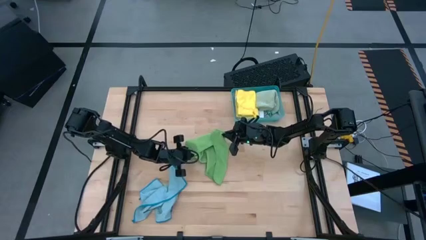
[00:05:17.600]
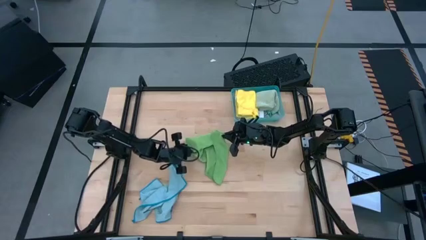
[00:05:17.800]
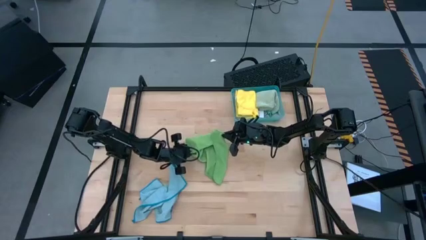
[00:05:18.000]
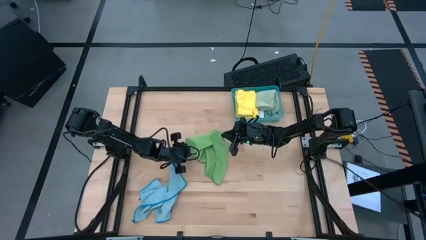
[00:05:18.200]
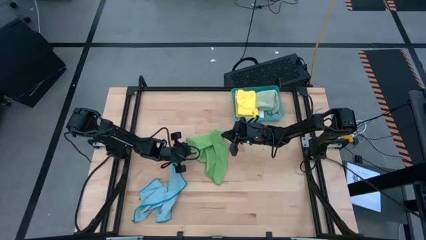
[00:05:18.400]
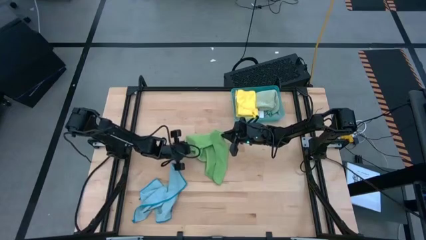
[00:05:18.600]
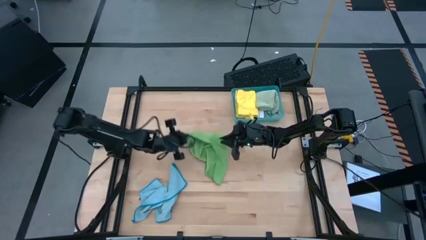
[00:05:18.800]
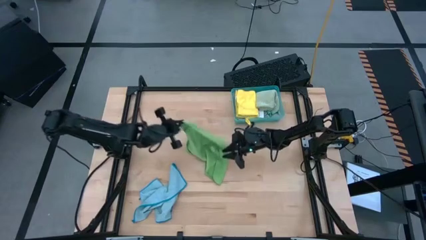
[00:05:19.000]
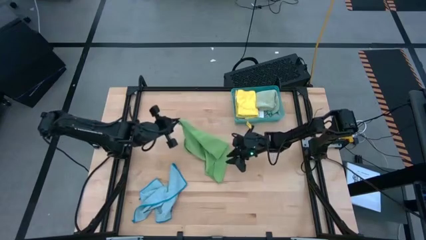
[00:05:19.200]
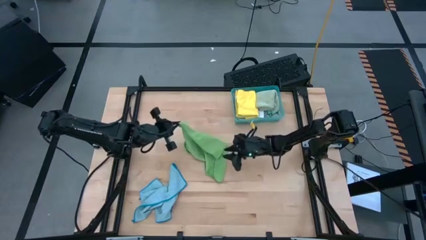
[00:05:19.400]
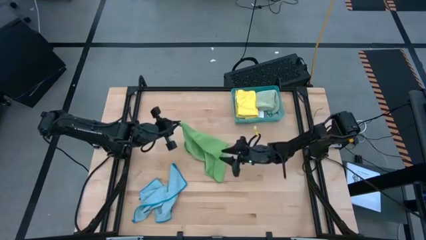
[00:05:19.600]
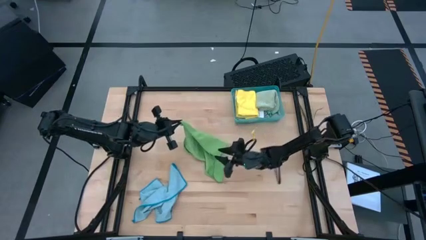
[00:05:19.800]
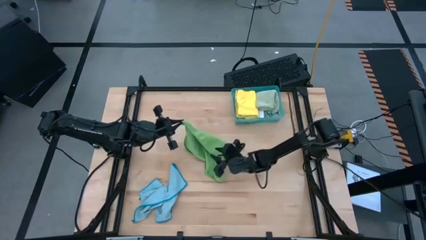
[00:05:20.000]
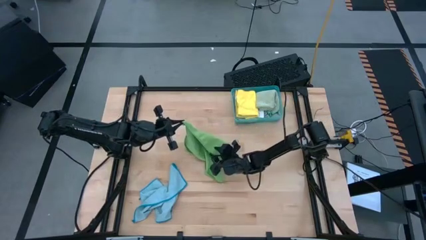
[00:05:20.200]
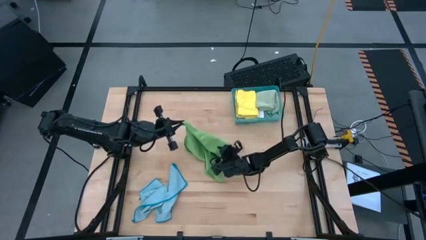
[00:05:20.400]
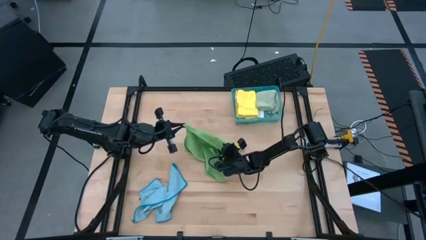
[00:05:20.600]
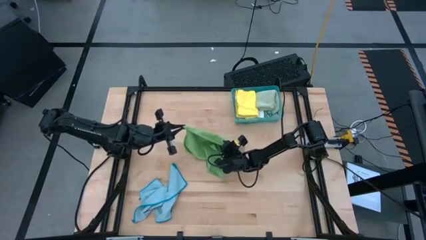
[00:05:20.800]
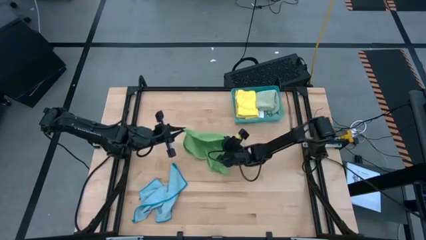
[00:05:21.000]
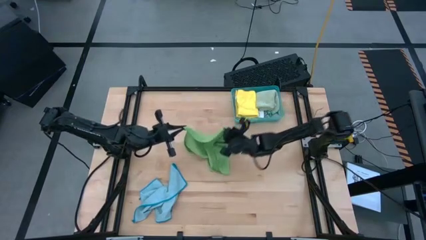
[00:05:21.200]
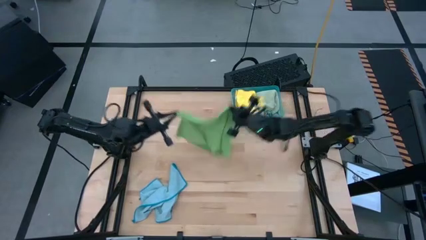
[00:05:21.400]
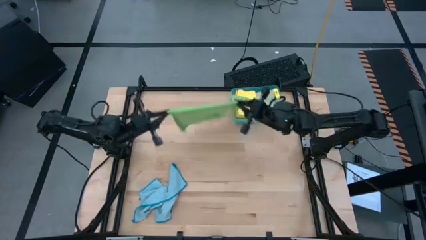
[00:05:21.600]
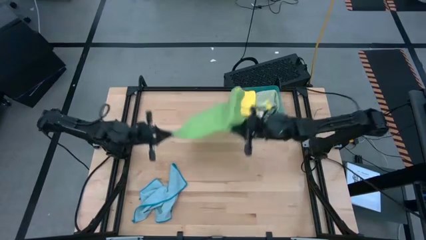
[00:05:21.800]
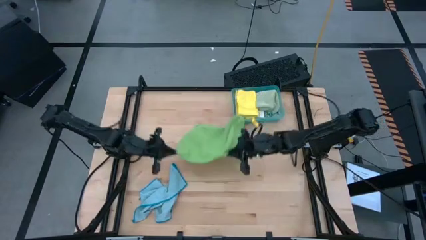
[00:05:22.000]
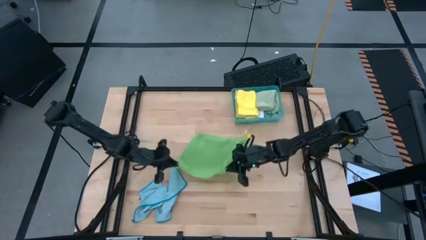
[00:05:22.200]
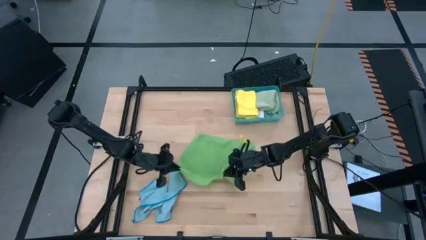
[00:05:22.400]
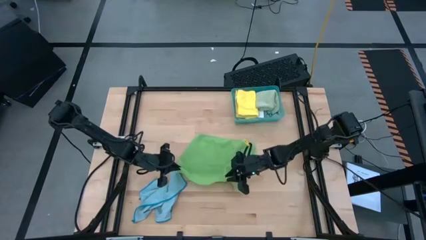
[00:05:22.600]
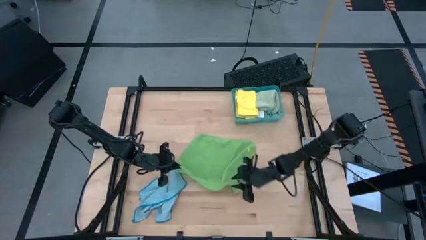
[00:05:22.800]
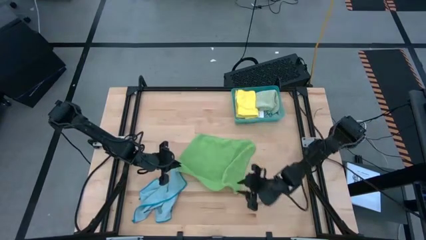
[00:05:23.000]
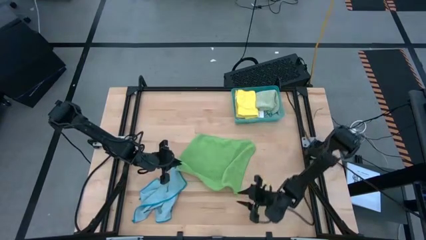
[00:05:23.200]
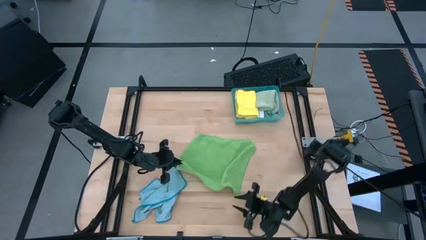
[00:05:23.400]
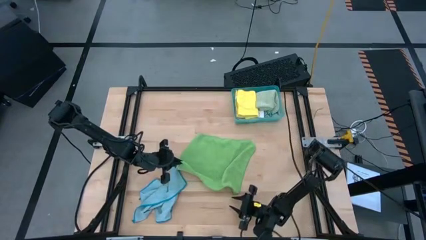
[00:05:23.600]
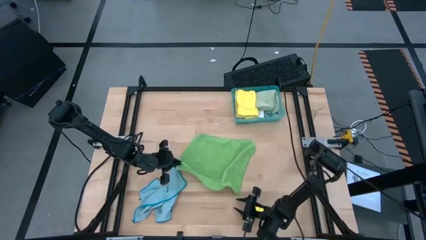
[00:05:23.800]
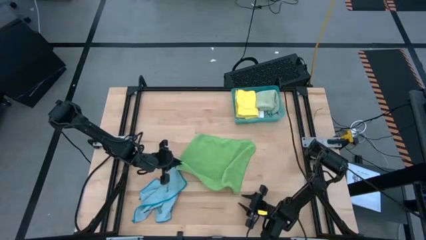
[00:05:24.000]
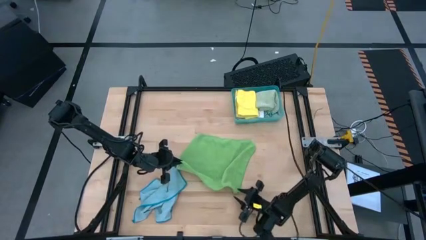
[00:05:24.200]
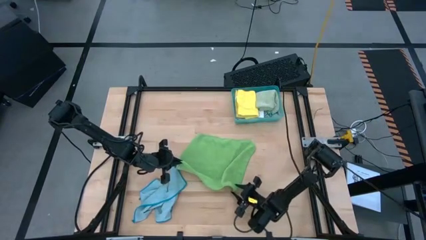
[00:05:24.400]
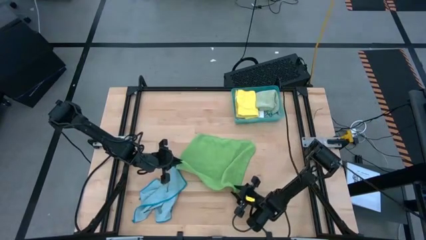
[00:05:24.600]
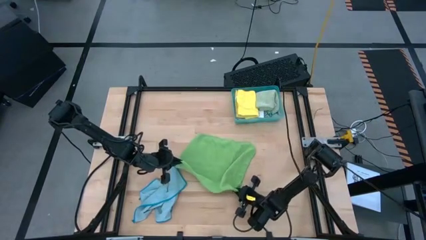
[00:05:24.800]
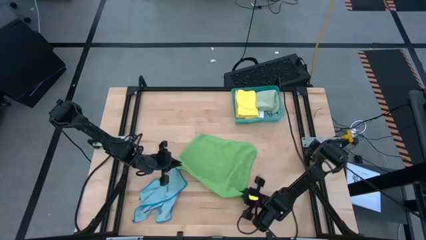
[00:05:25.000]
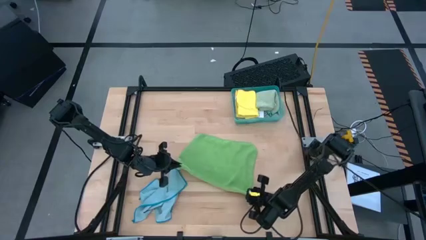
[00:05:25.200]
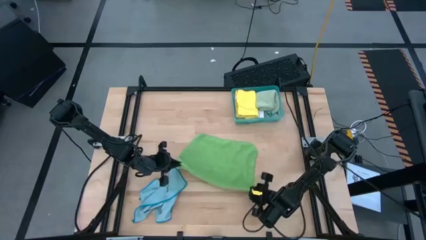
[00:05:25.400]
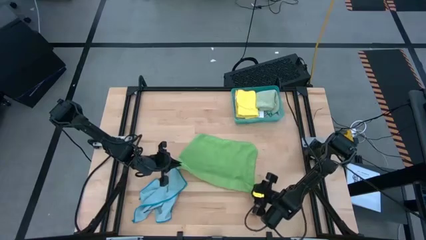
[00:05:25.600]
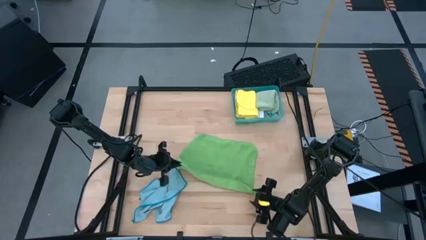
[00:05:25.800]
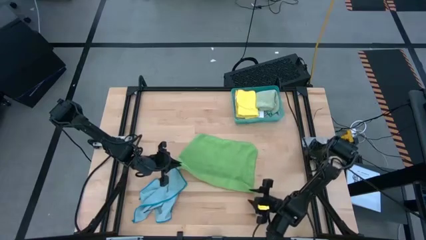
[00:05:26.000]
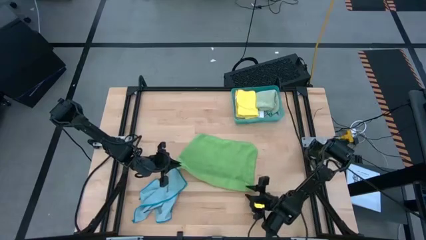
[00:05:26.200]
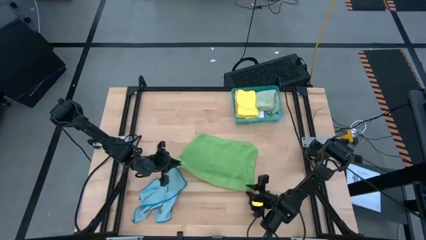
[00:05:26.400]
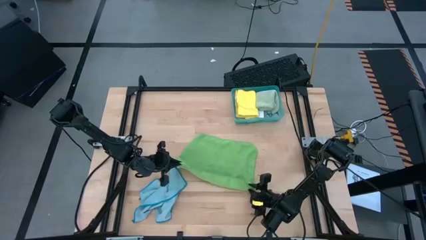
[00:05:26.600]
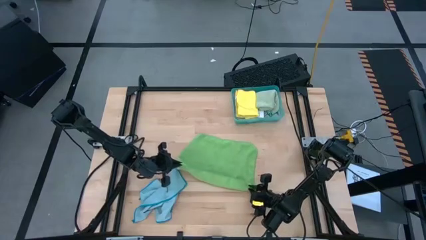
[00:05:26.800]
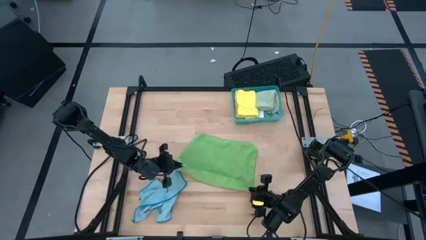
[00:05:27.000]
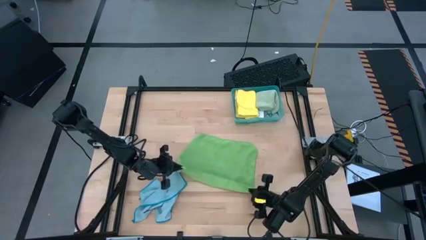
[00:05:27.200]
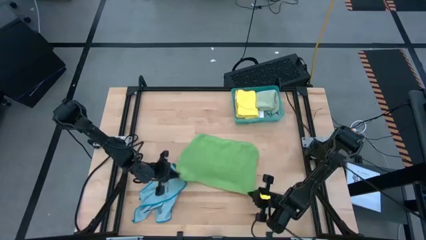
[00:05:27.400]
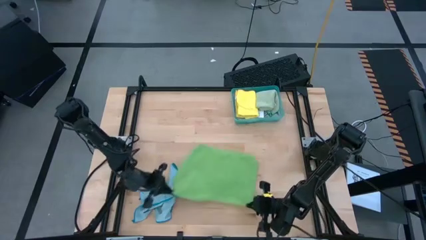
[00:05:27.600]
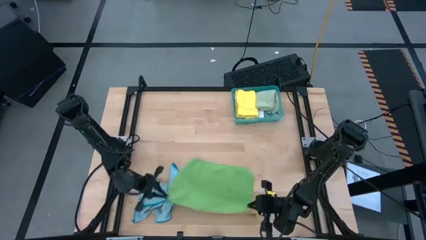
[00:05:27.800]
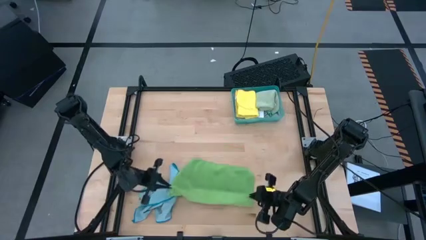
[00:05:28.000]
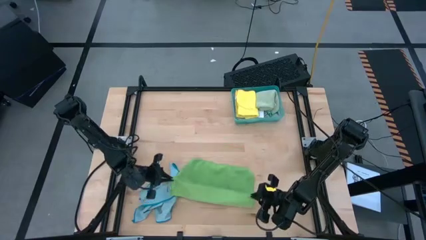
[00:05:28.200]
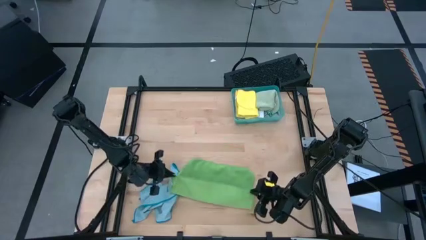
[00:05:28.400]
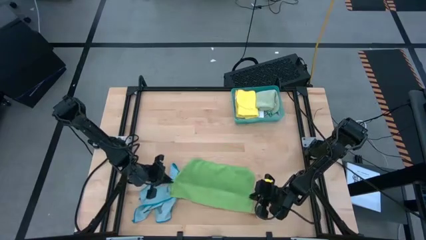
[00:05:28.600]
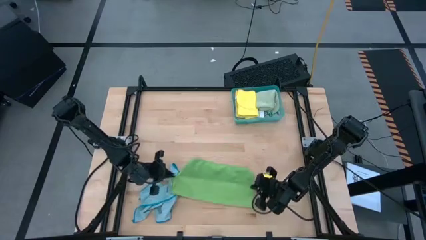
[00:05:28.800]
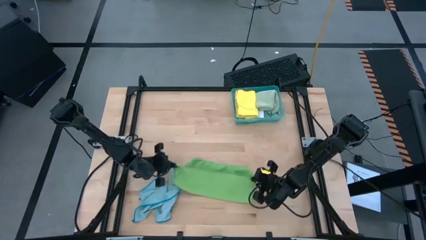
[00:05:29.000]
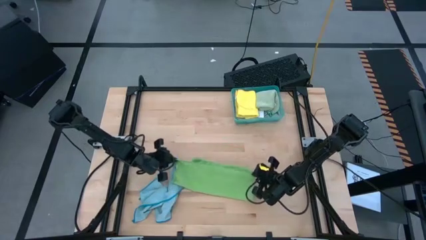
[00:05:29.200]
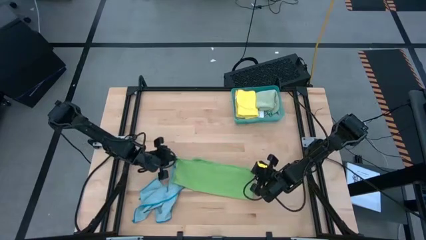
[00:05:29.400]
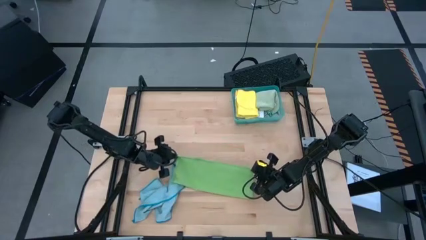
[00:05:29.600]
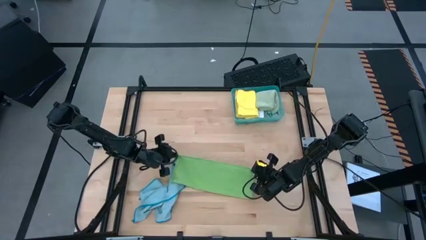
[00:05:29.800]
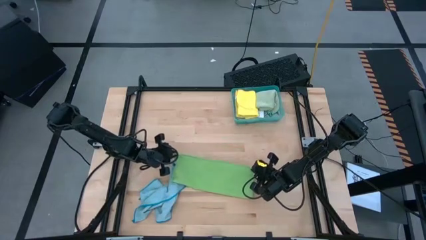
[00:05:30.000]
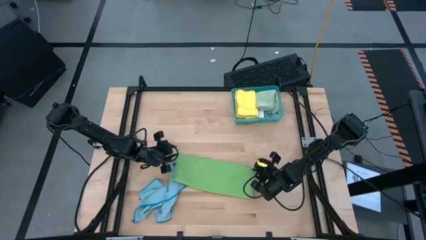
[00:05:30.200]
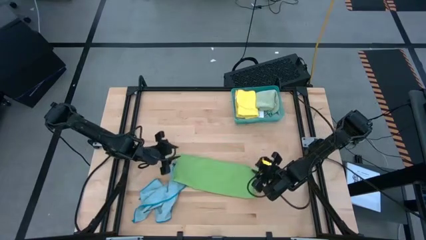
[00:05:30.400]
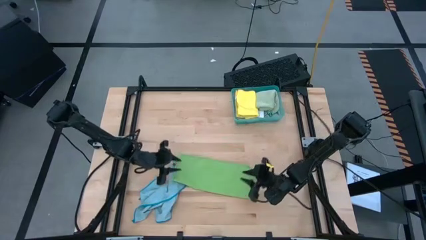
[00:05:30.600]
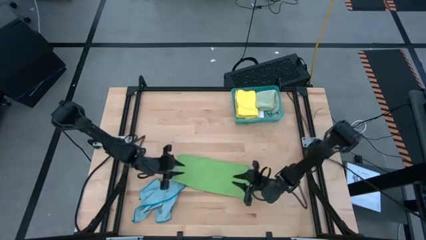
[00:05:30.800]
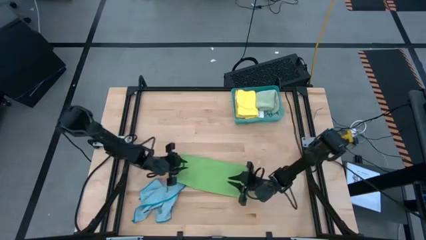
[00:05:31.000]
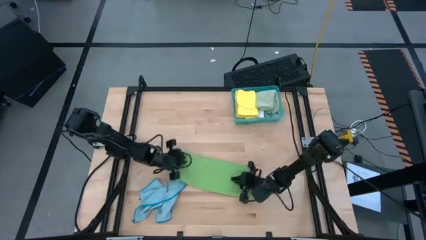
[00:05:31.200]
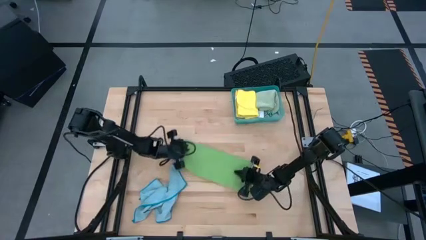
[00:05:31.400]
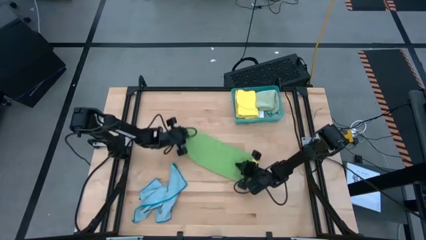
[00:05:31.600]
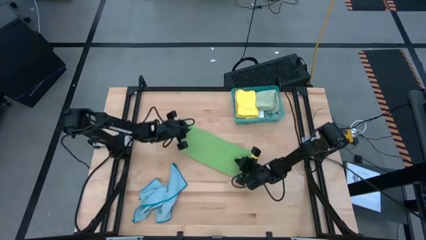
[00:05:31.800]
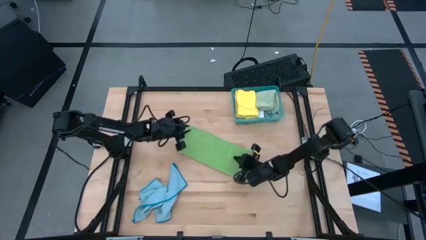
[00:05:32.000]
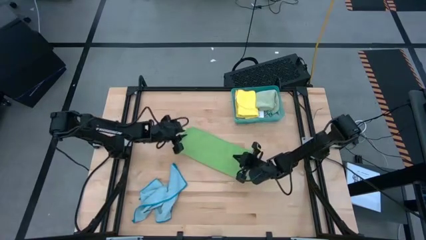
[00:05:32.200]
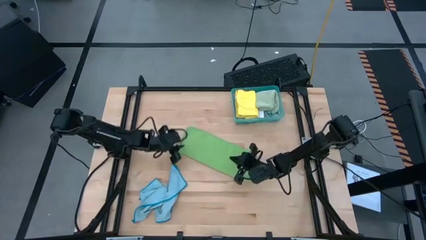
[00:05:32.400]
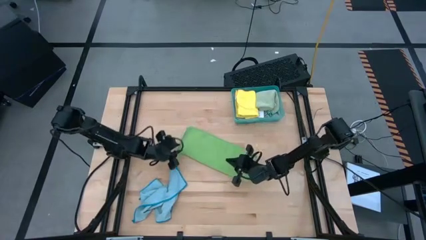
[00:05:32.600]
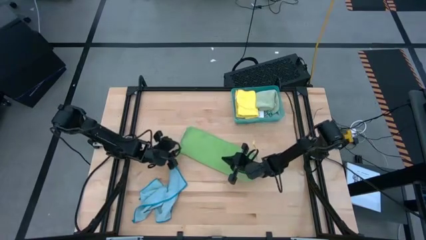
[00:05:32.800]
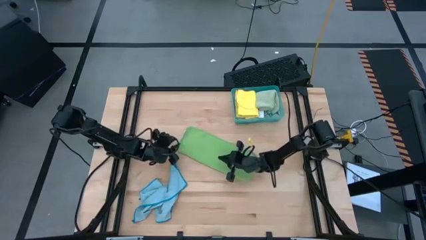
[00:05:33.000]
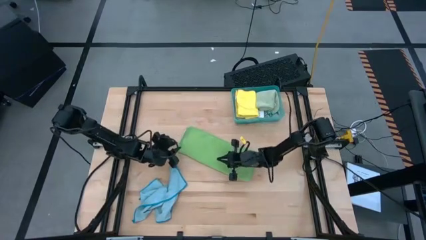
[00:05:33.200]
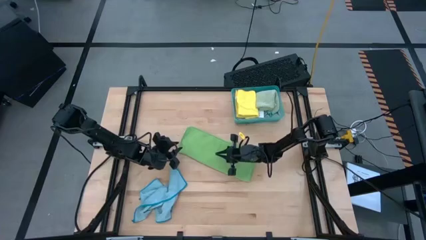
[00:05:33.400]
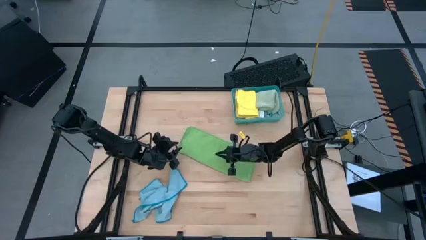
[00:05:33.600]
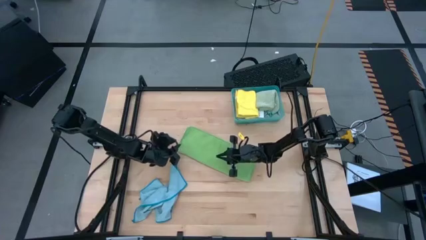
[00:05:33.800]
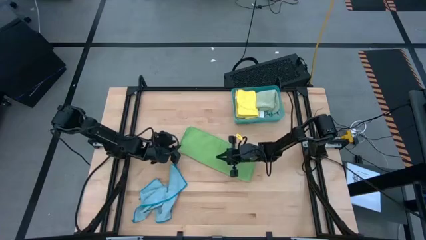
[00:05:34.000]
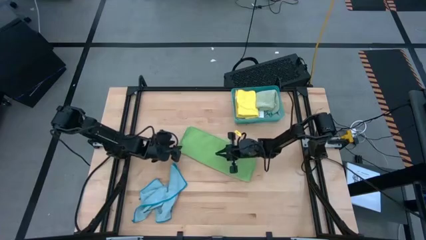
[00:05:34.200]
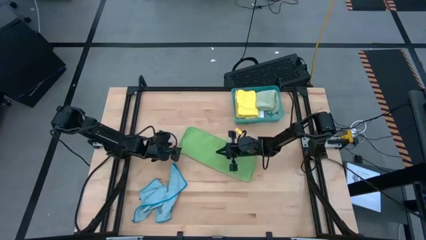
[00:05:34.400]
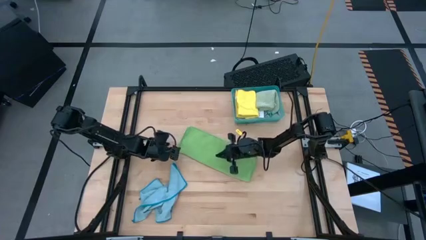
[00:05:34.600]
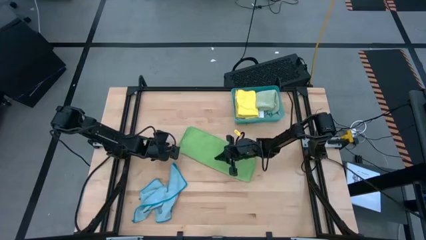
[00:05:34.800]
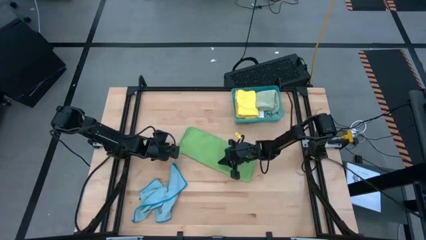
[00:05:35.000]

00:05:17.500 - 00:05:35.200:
Task: Fold microfiber towels
Fold the green microfiber cloth
